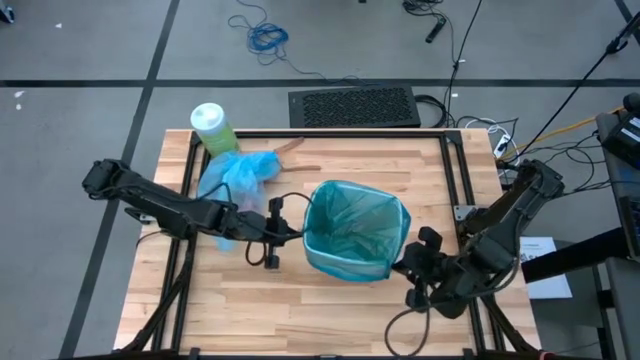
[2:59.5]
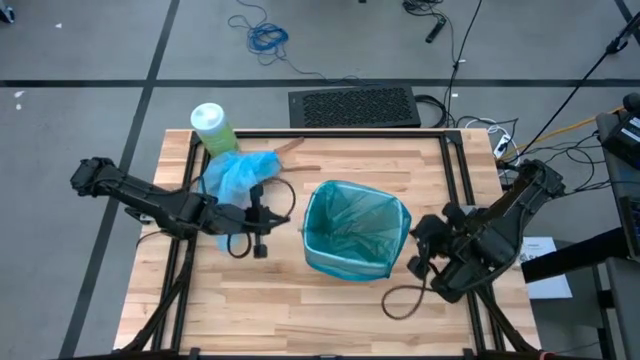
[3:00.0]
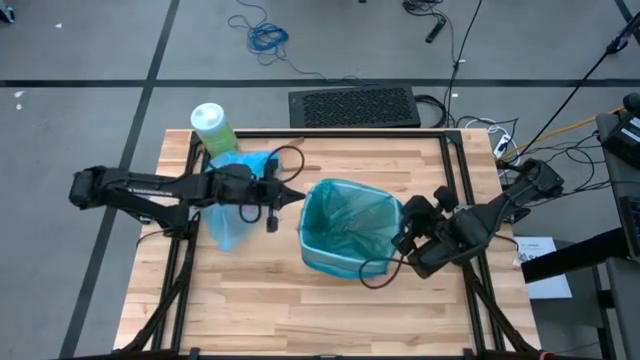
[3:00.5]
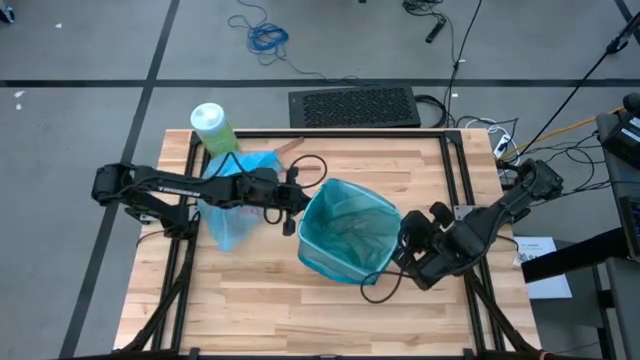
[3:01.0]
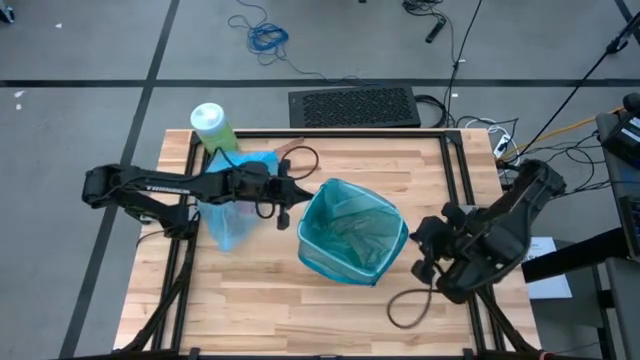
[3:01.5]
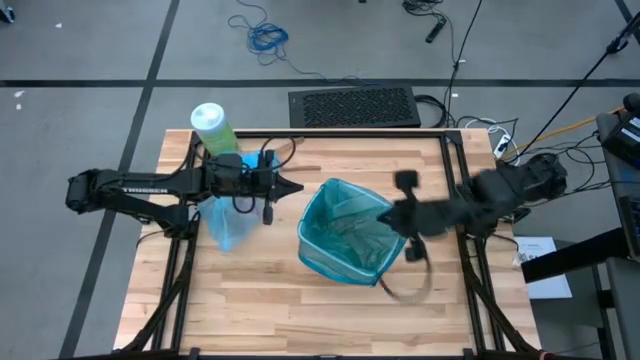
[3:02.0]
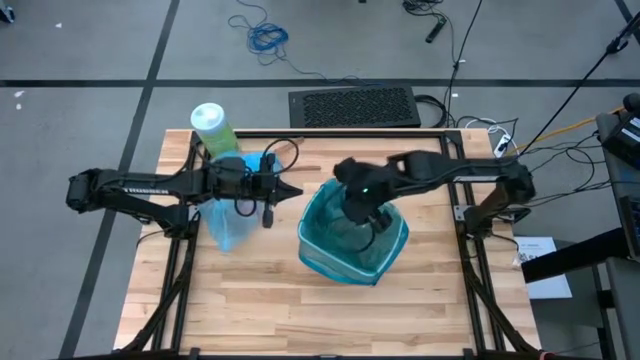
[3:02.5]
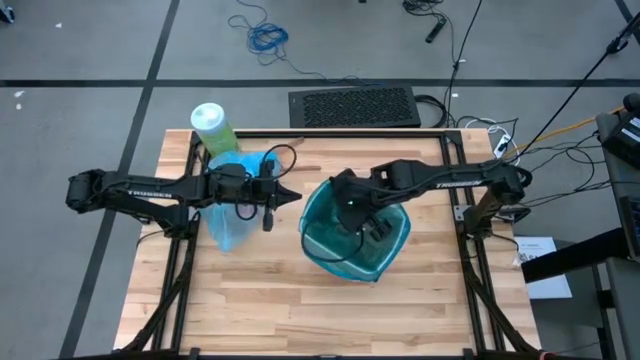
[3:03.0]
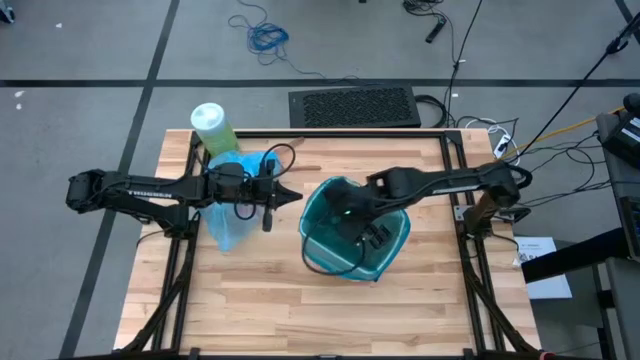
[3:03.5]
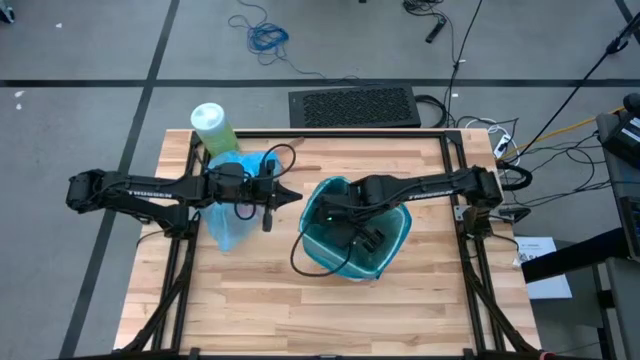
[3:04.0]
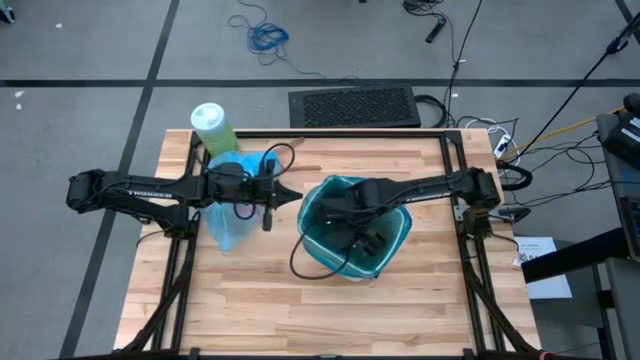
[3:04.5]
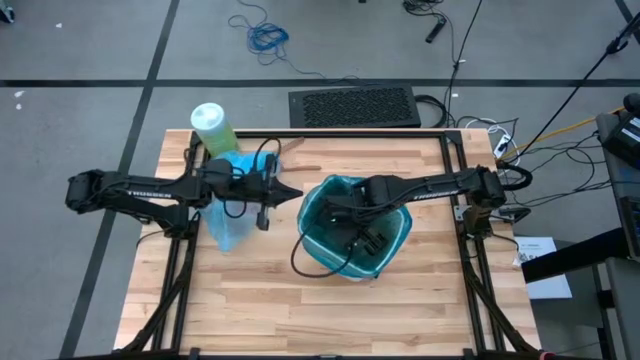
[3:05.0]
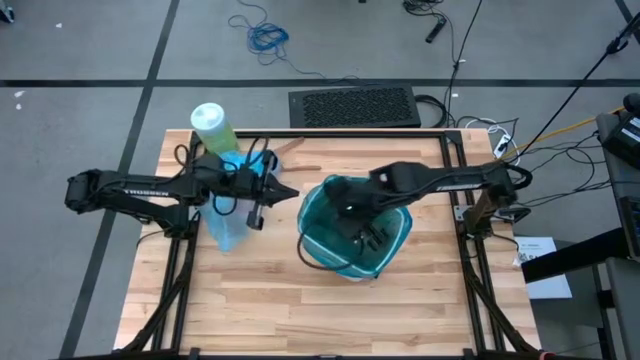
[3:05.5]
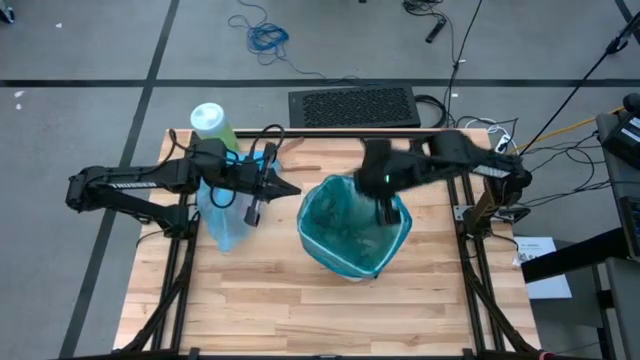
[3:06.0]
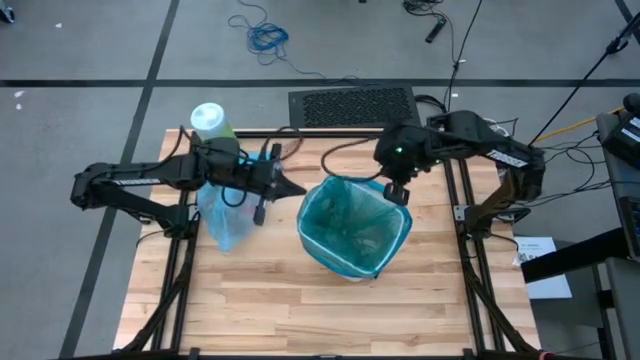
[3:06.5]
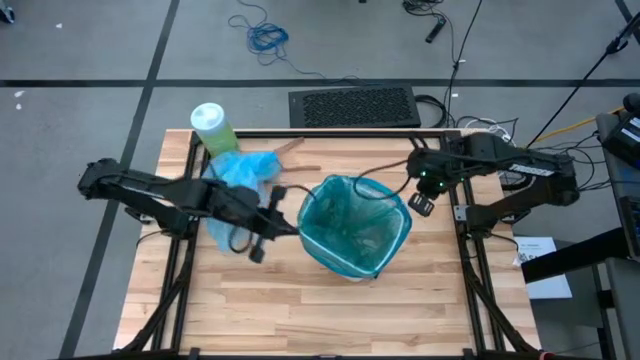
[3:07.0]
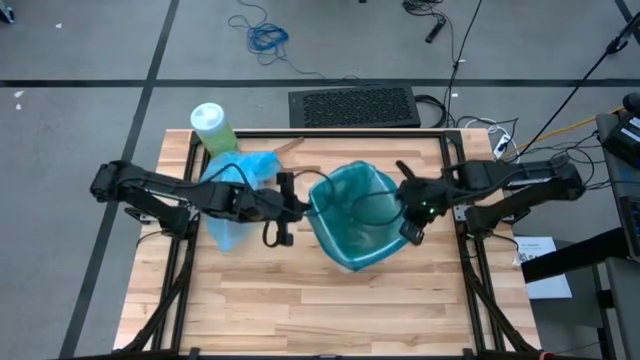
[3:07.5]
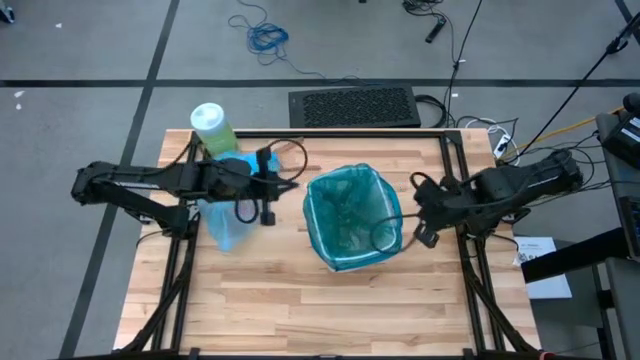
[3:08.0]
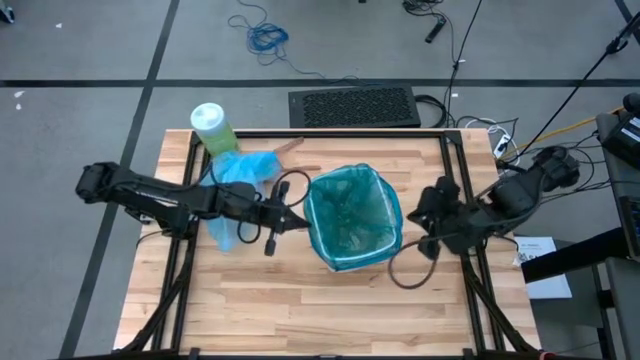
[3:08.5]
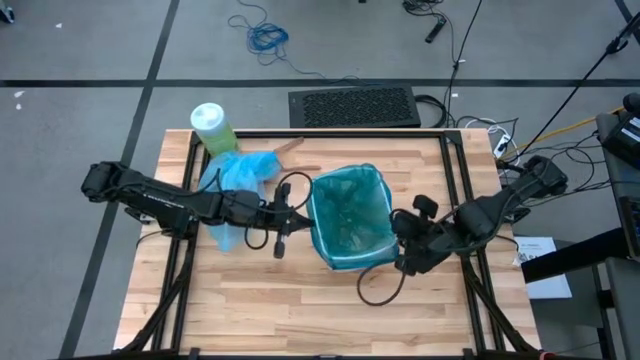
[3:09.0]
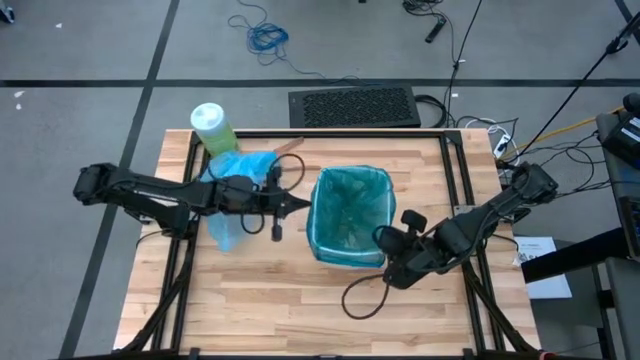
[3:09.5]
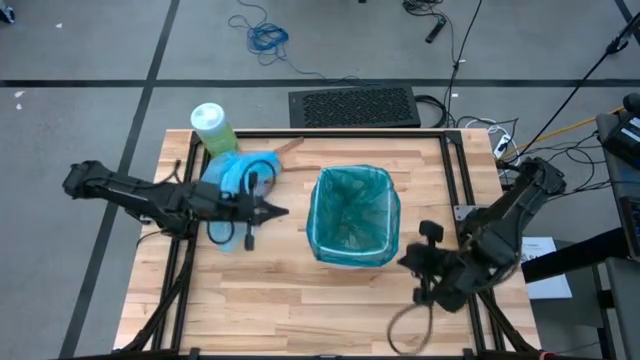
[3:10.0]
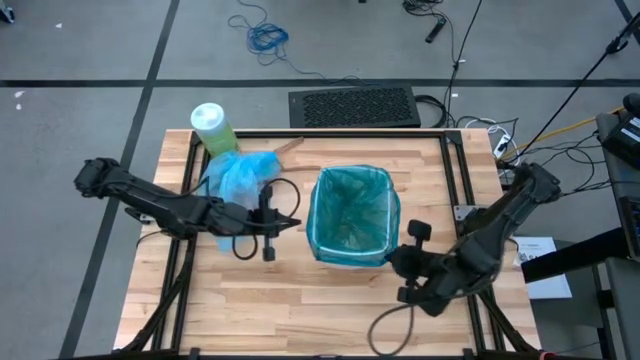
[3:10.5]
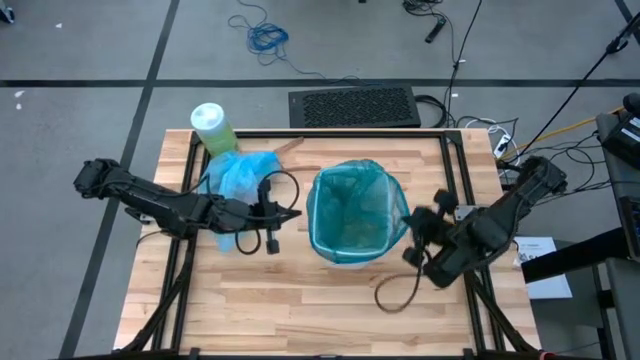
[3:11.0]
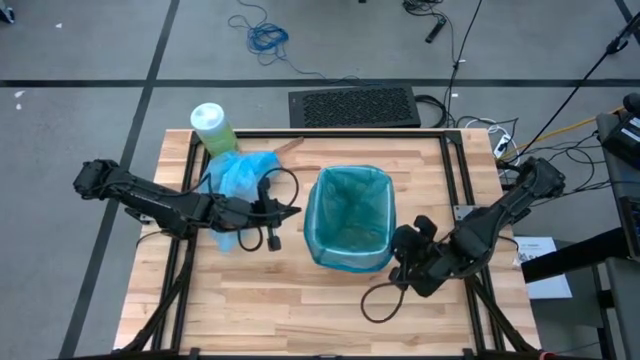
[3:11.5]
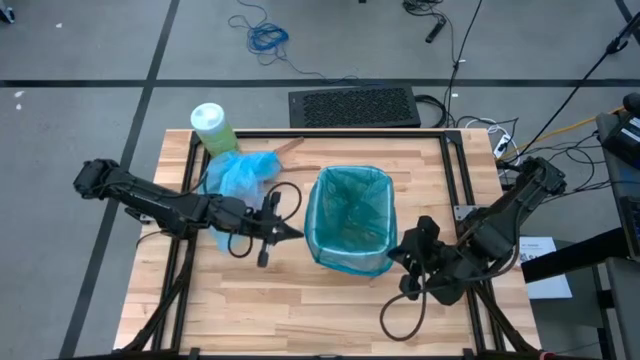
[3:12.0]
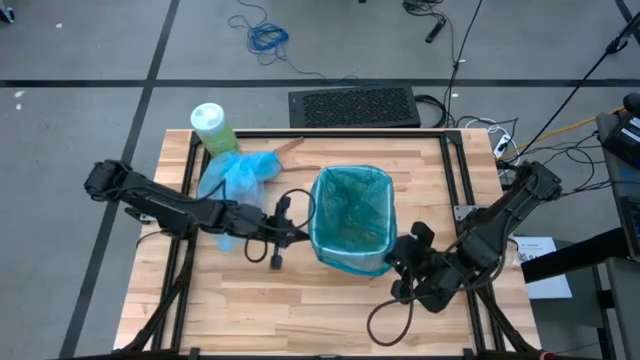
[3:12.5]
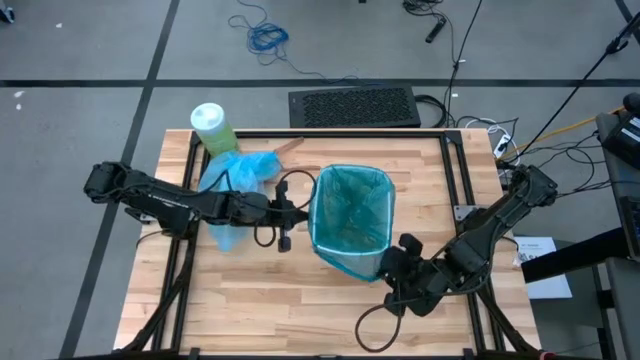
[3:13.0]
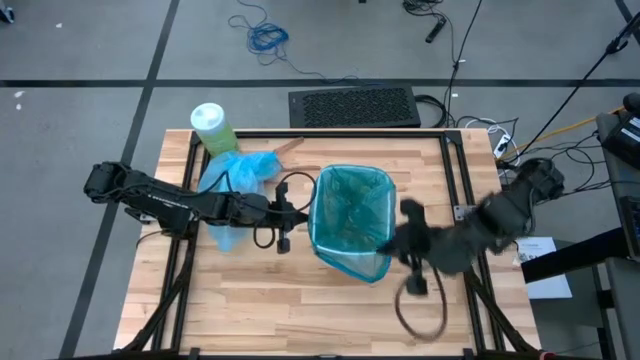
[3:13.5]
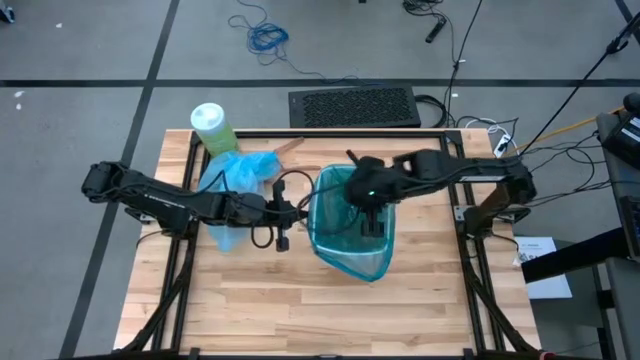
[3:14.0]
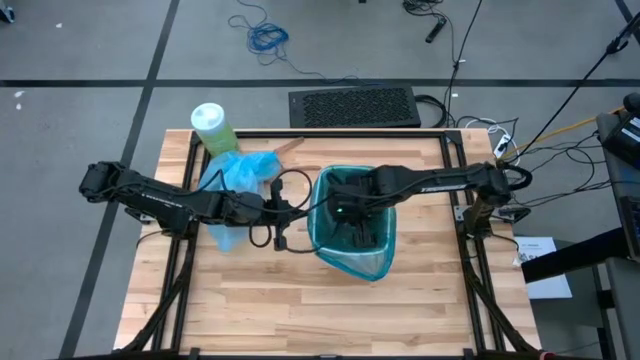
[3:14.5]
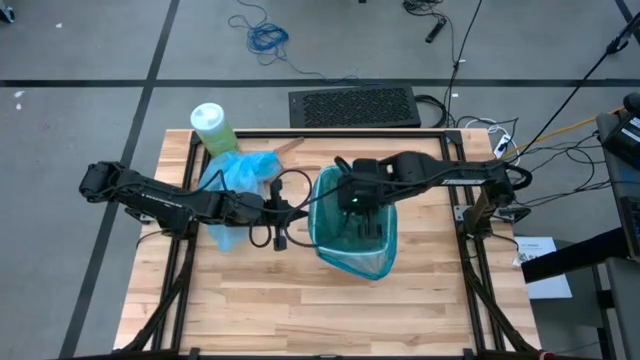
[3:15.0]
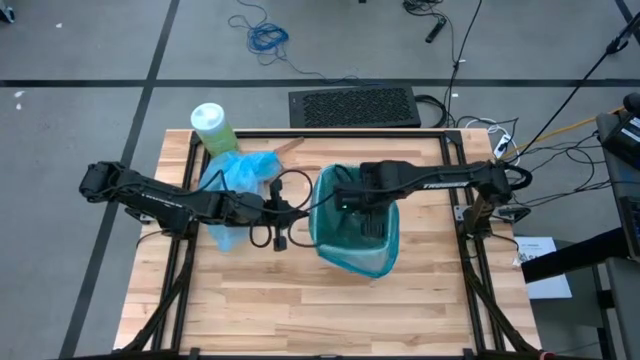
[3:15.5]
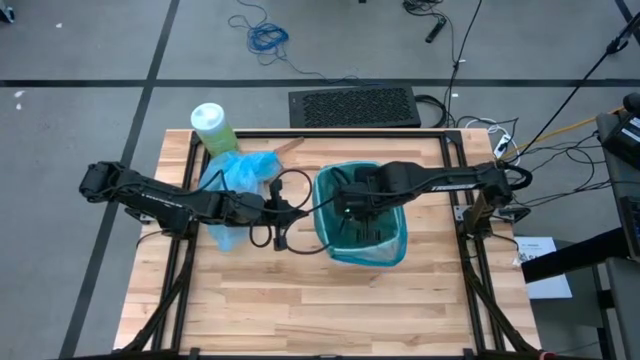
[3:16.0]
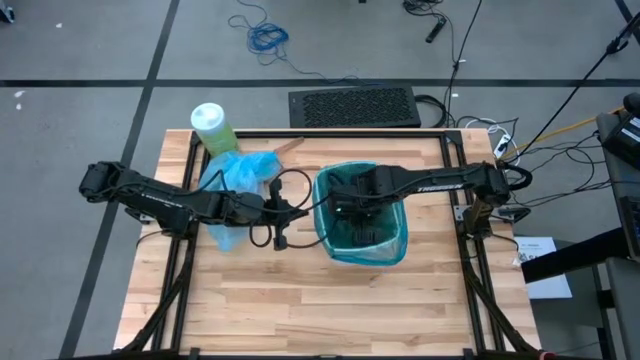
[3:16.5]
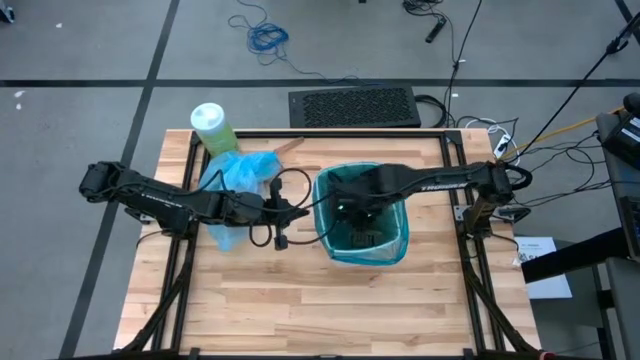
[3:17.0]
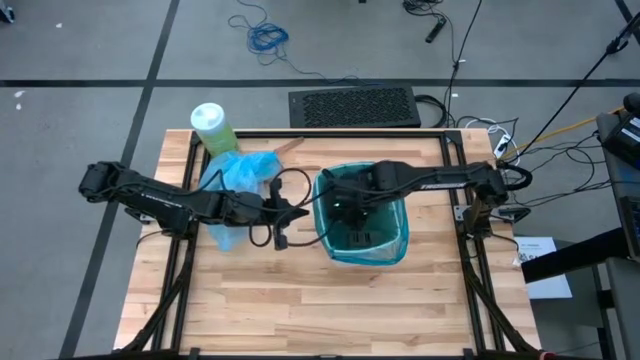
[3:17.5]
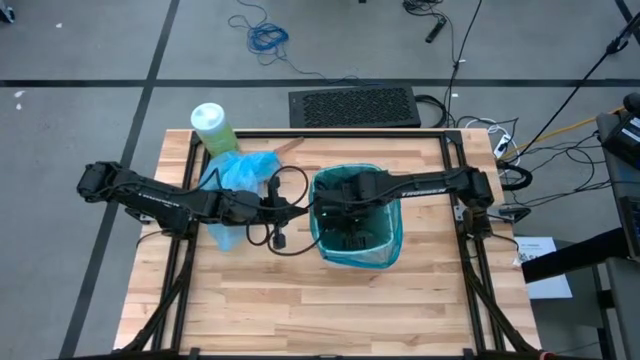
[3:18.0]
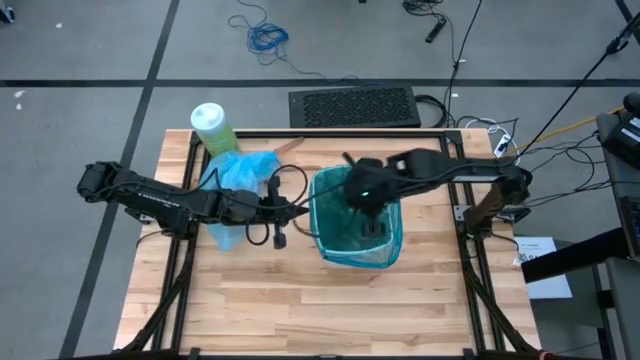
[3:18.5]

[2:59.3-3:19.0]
Task: place trash/remove bag and relplace
Insert the plastic bag in the white trash bin

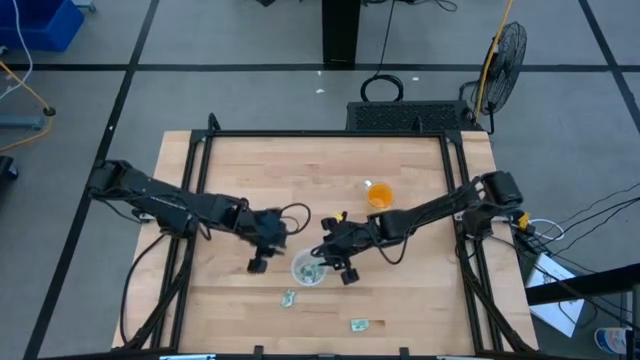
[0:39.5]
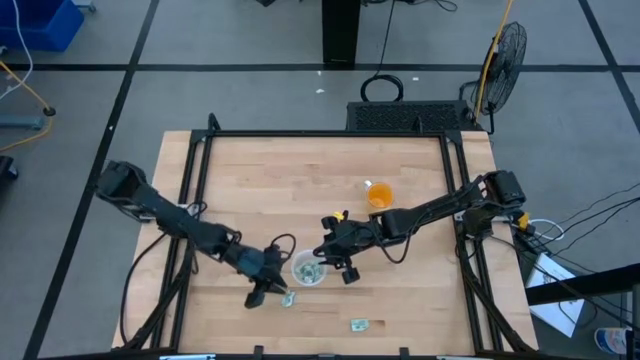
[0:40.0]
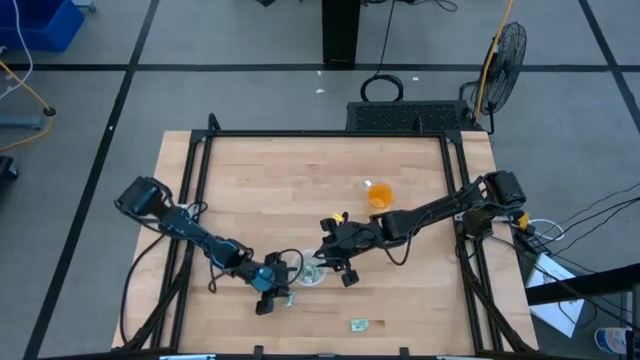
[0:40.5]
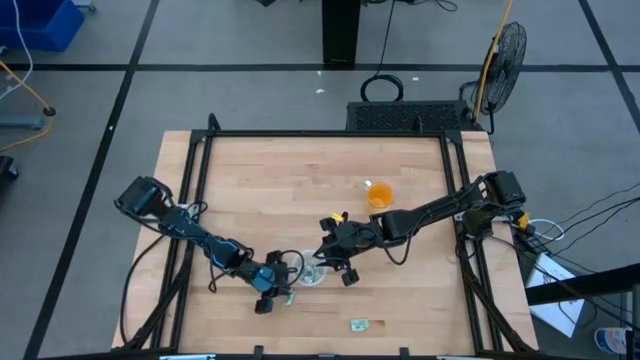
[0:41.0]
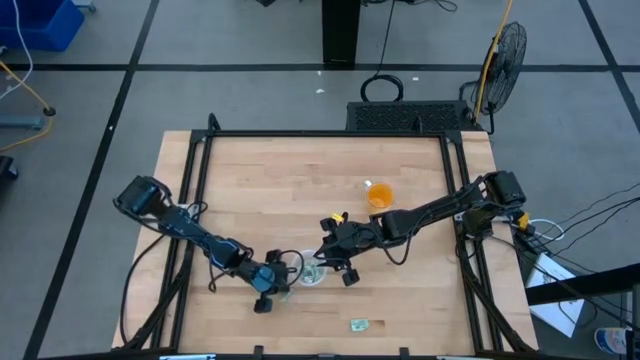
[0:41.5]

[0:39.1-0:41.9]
Task: Pick and place items into bin
Put the white stevia packet into the transparent bin

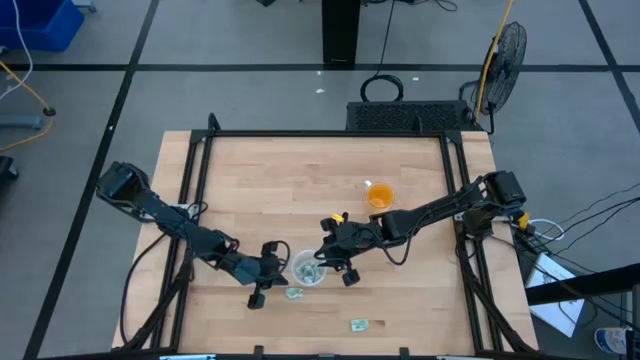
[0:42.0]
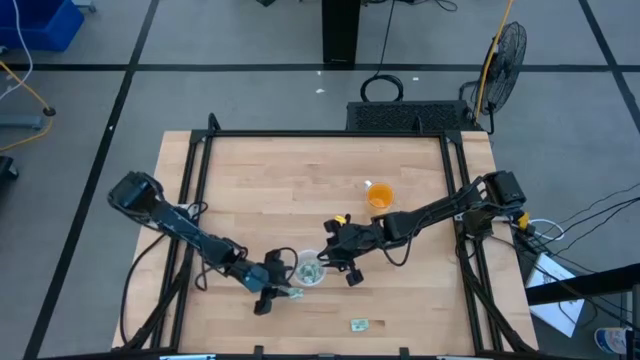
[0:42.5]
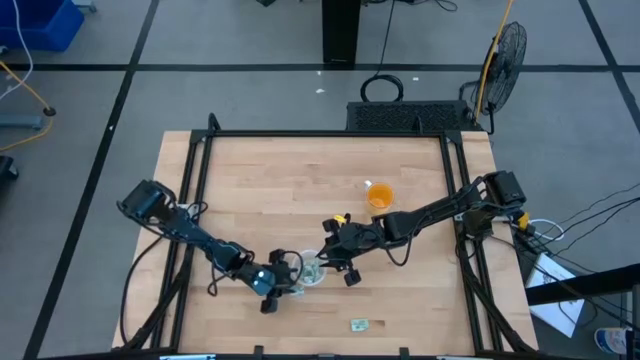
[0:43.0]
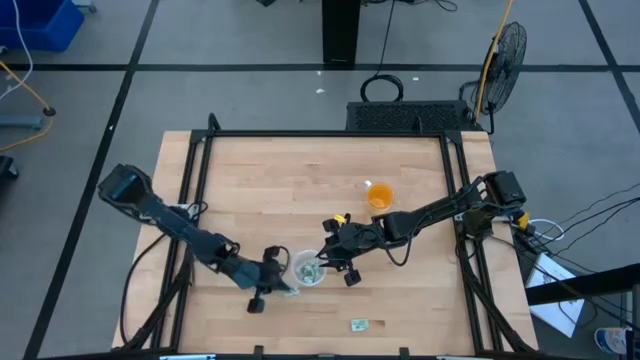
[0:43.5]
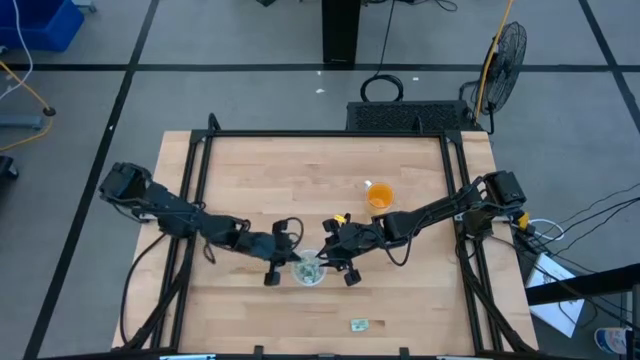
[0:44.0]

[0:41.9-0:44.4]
Put the white stevia packet into the transparent bin
